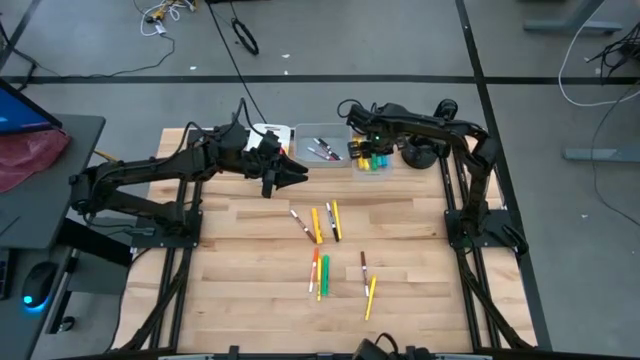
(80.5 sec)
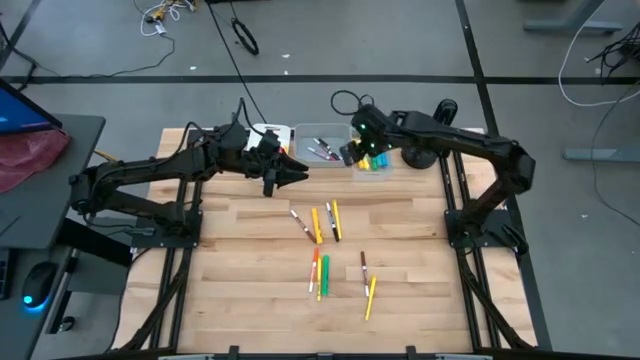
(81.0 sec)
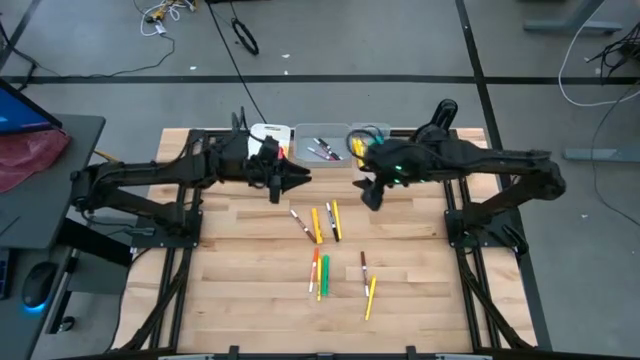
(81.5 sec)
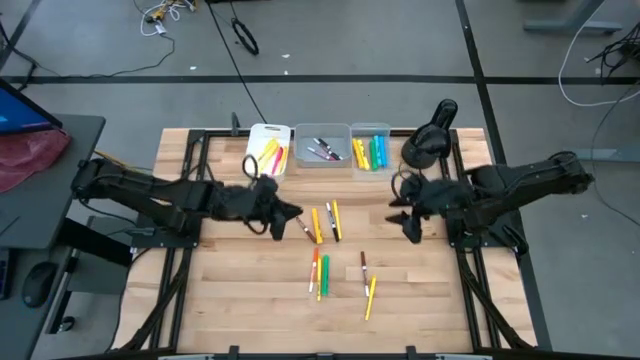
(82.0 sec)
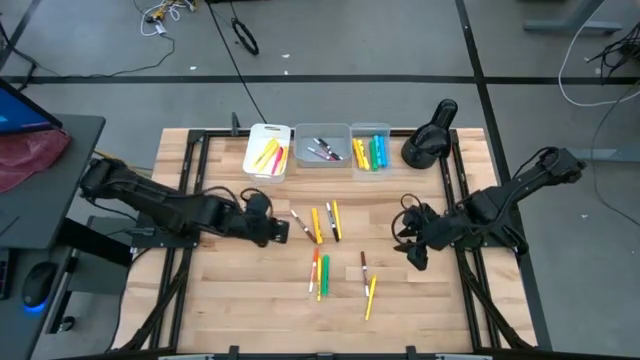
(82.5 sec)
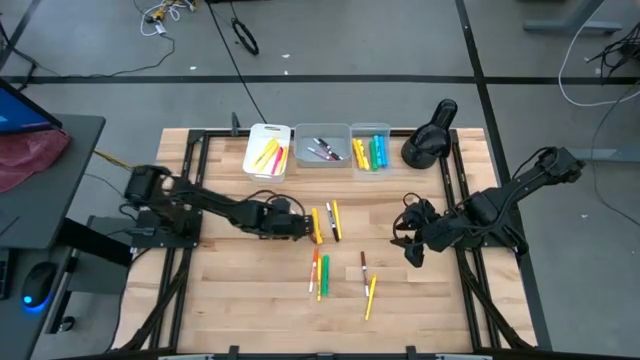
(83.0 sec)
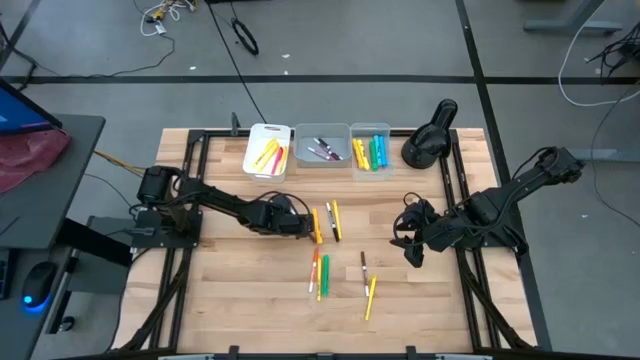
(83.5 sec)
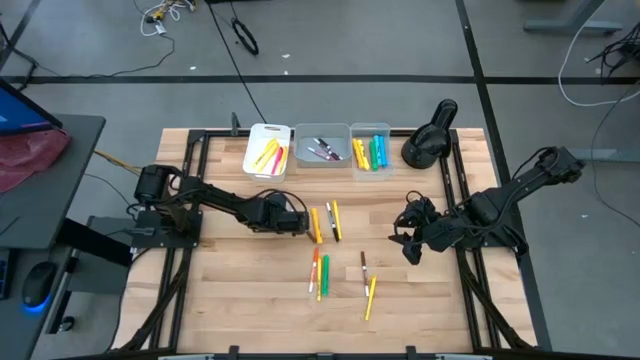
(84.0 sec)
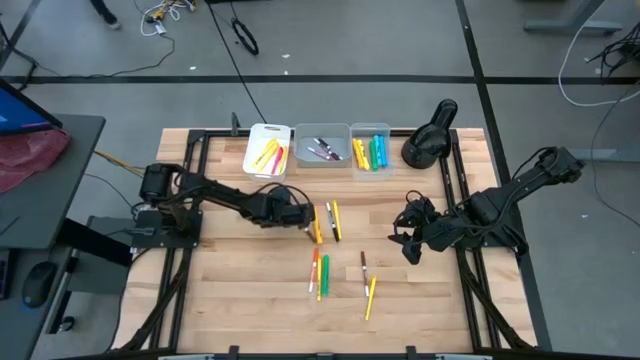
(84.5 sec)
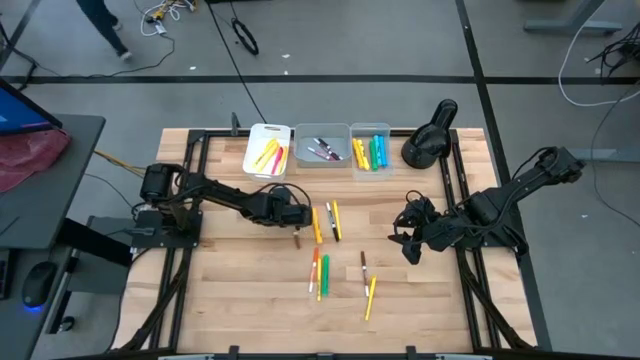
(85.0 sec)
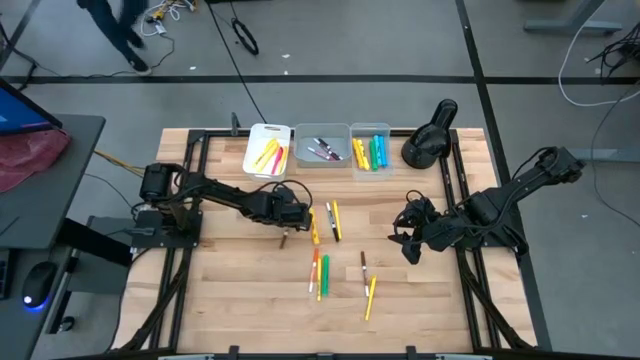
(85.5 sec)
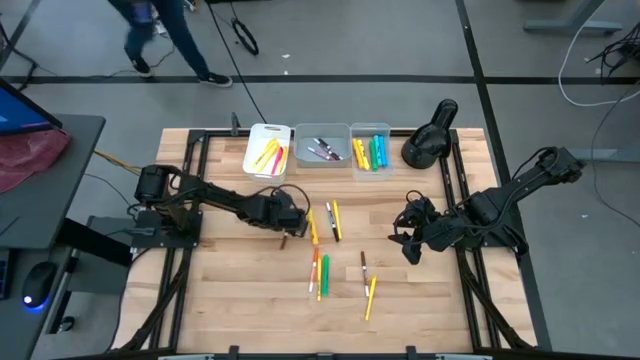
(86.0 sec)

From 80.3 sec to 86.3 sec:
Task: Pick & Place Markers
Put the brown marker pen into the gray bin

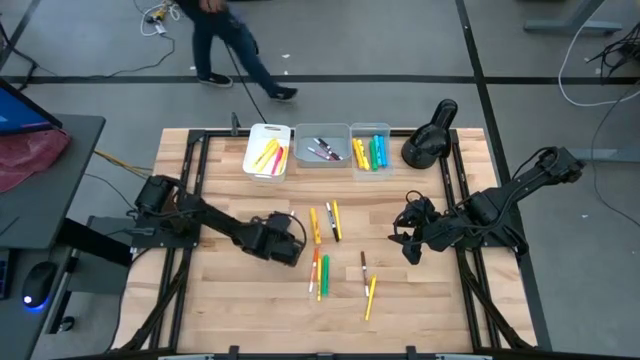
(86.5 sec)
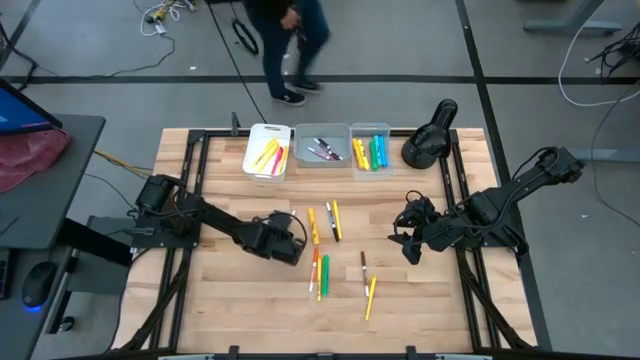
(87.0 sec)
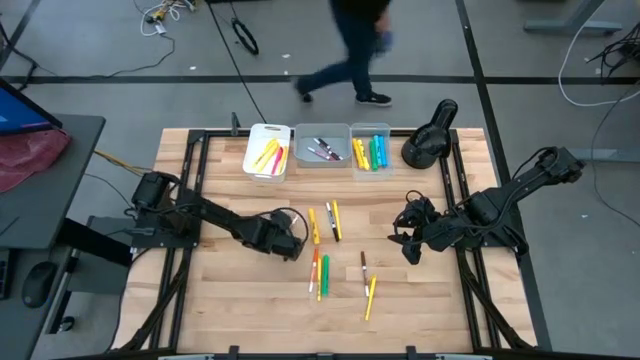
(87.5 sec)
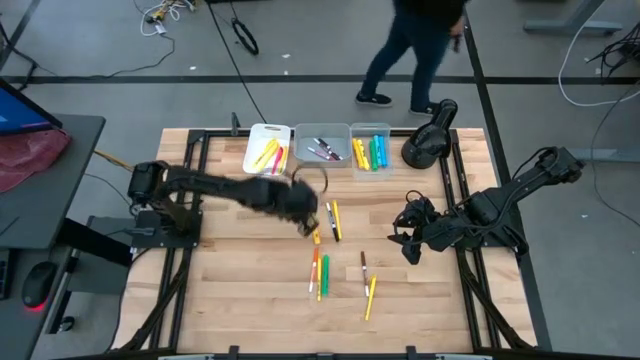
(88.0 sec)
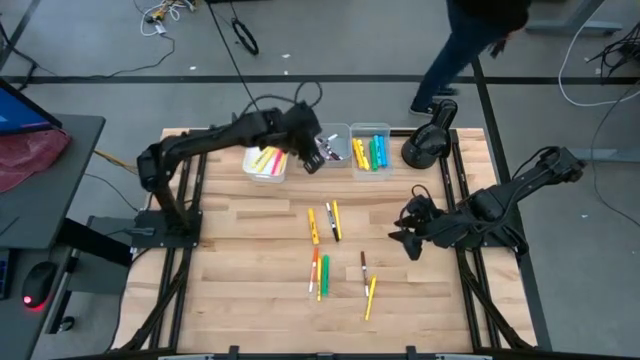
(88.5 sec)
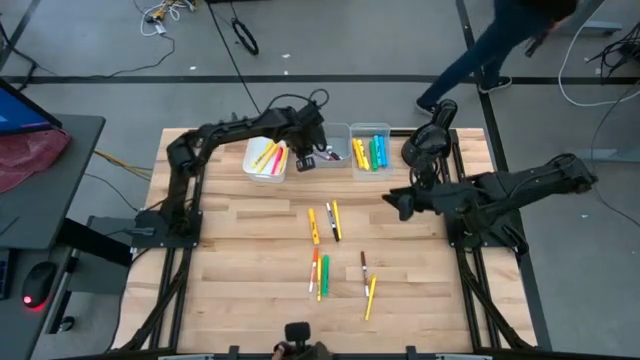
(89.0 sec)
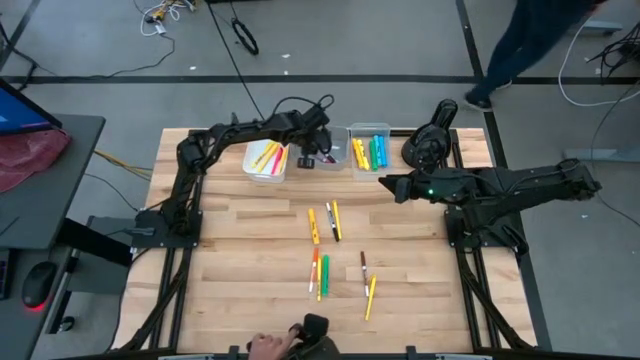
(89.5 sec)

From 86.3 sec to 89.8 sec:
Put the brown marker pen into the gray bin

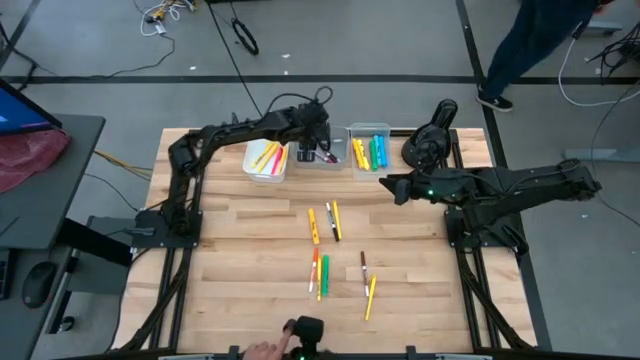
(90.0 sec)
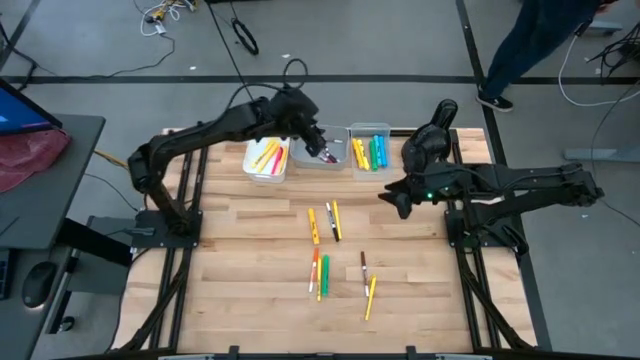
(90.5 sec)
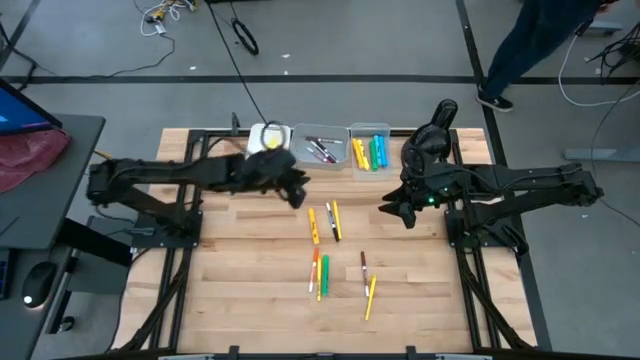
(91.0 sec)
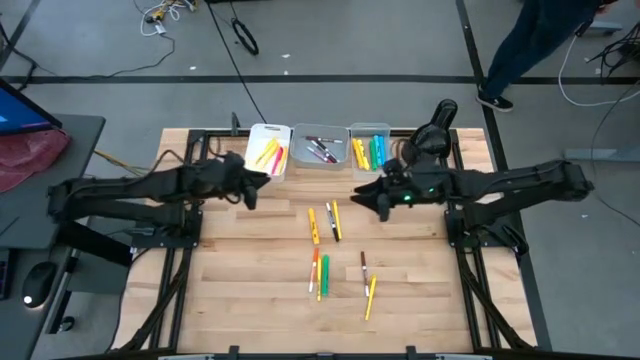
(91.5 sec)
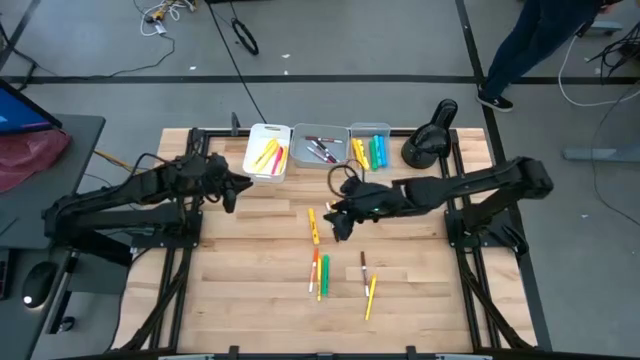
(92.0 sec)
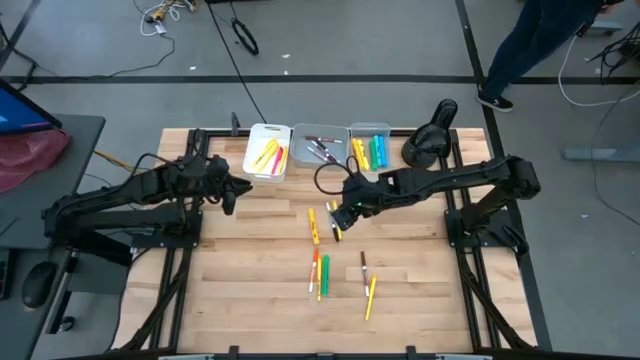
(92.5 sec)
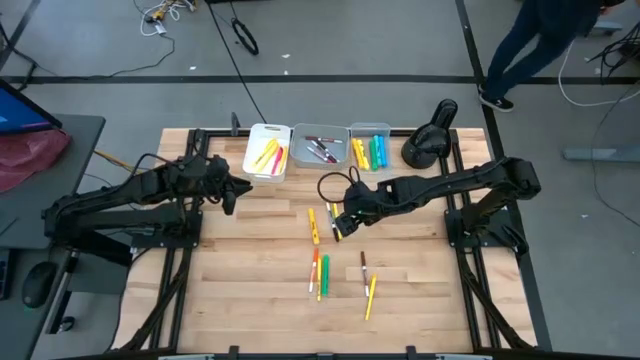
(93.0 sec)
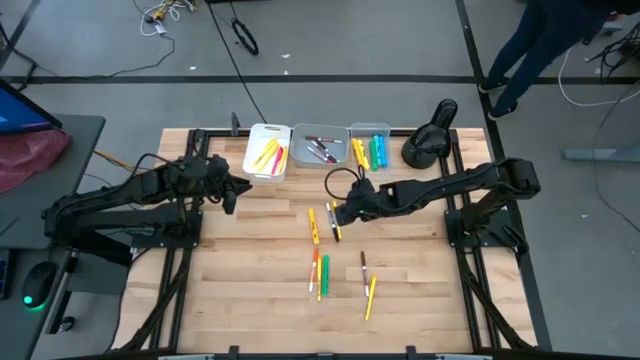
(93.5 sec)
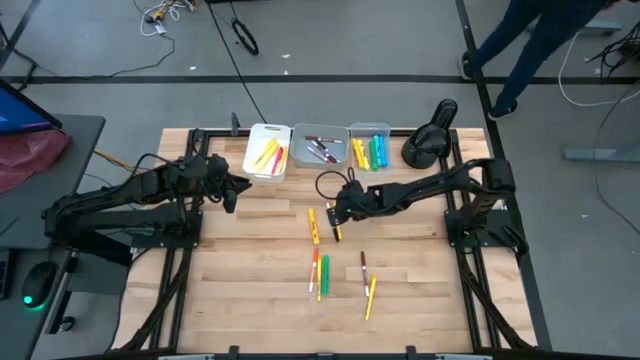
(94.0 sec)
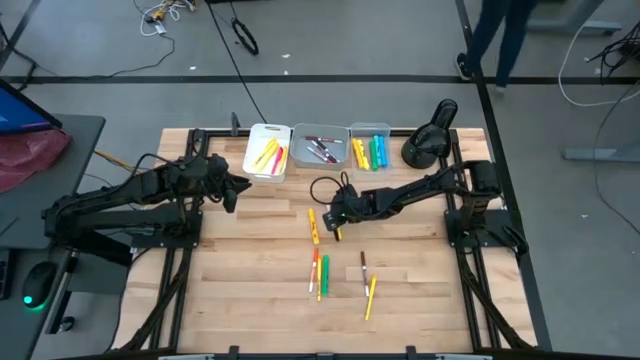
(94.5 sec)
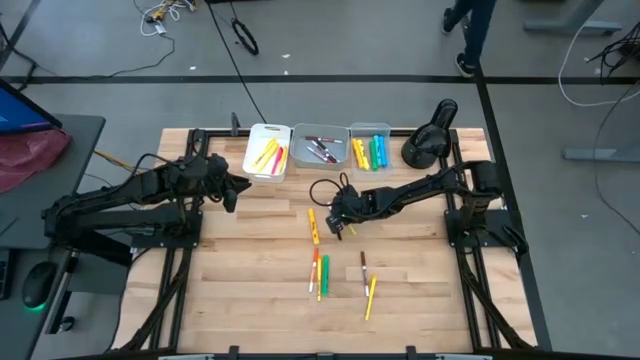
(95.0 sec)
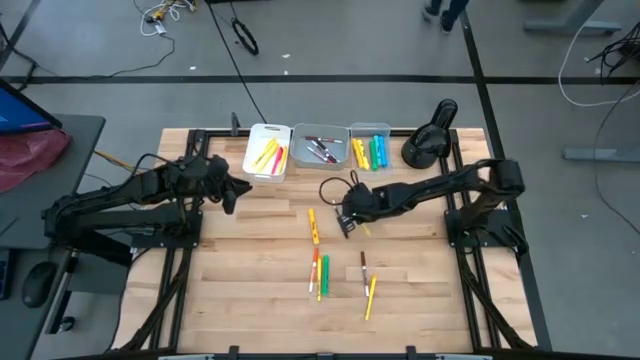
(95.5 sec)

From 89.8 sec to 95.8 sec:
Put the yellow pen into the white bin

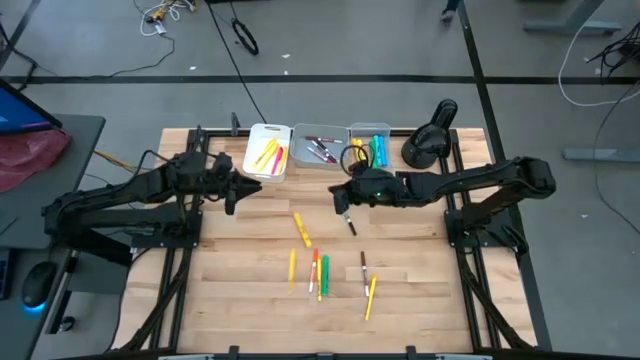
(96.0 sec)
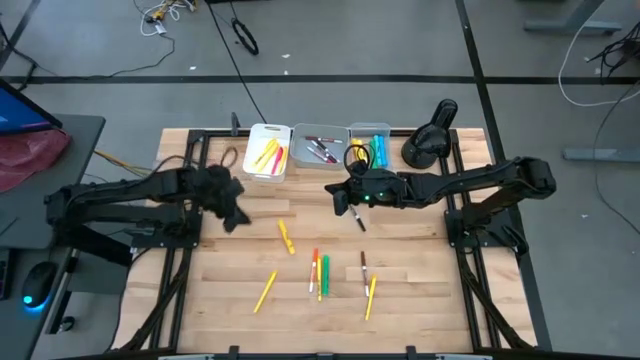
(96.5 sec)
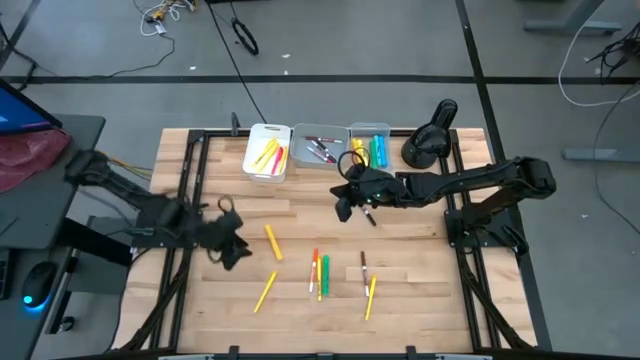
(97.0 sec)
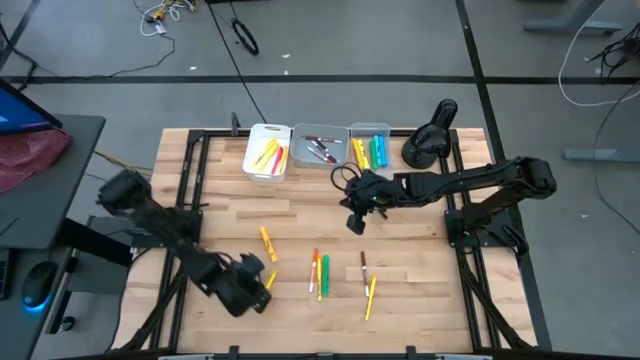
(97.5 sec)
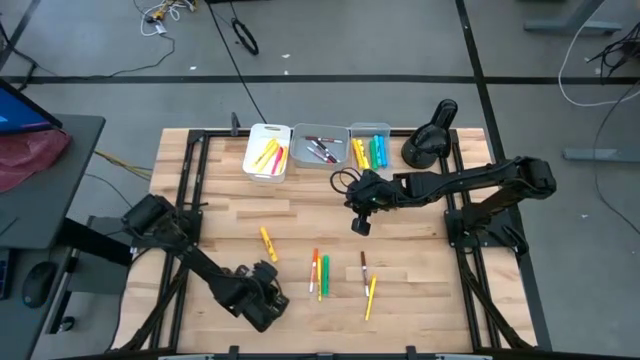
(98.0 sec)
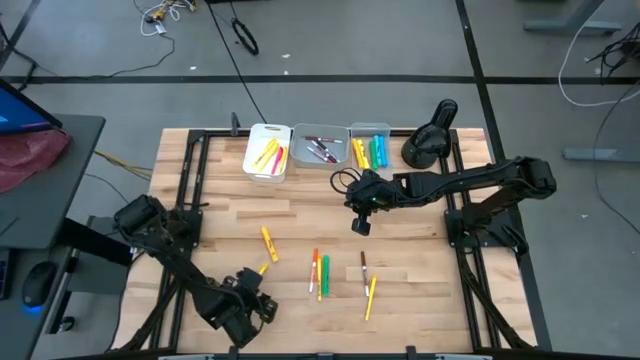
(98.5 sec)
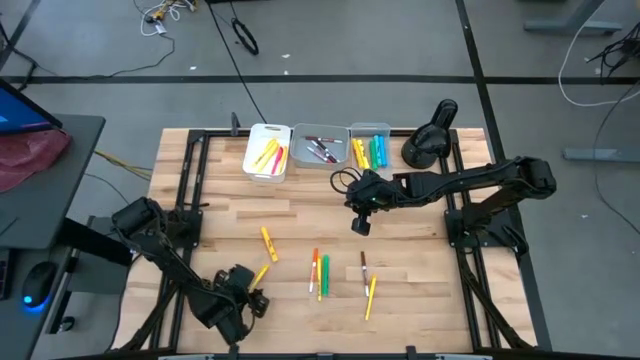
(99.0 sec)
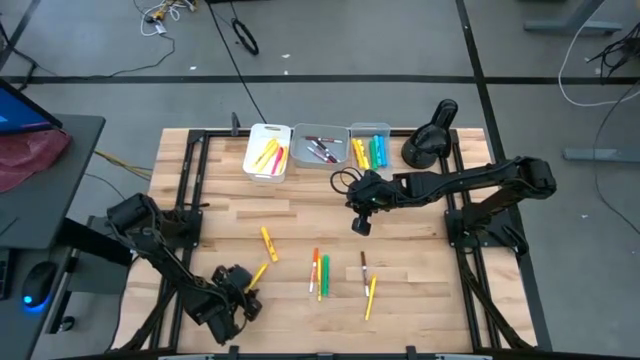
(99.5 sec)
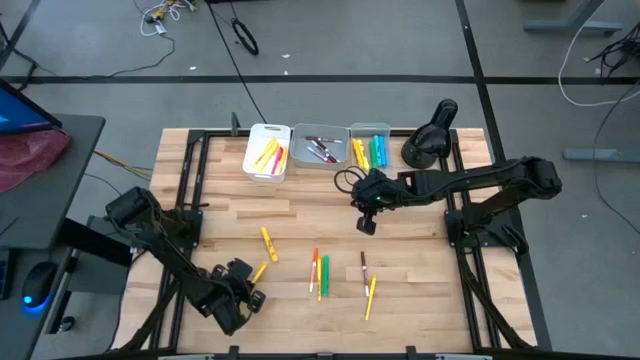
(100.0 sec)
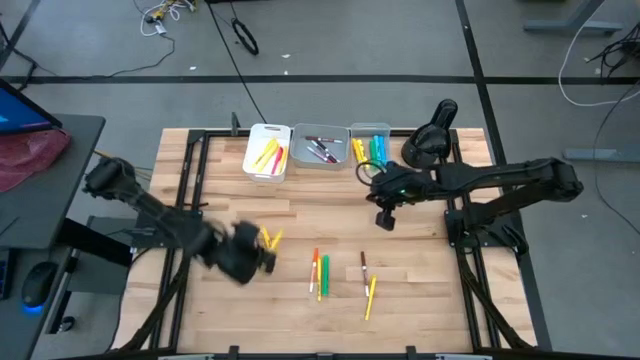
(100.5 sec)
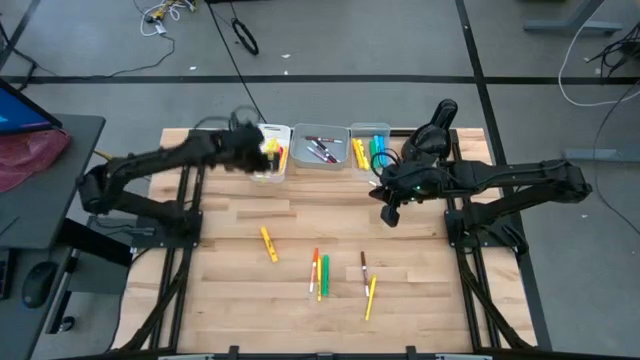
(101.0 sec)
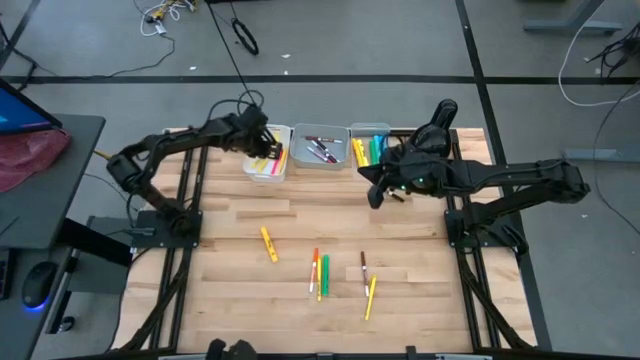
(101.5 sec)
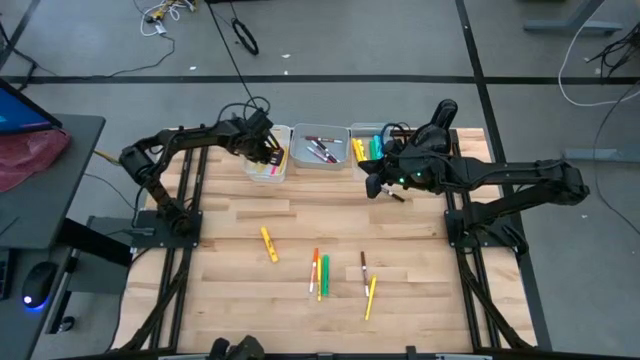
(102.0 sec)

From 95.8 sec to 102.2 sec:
Put the yellow pen into the white bin
